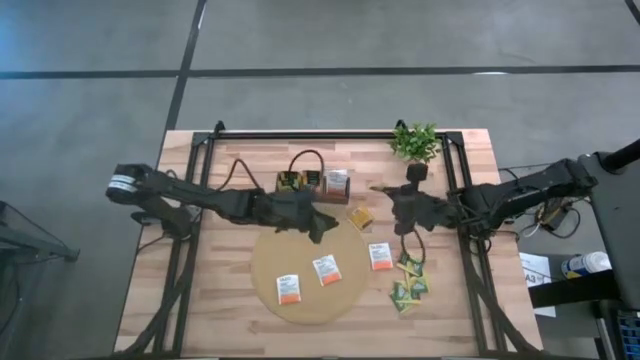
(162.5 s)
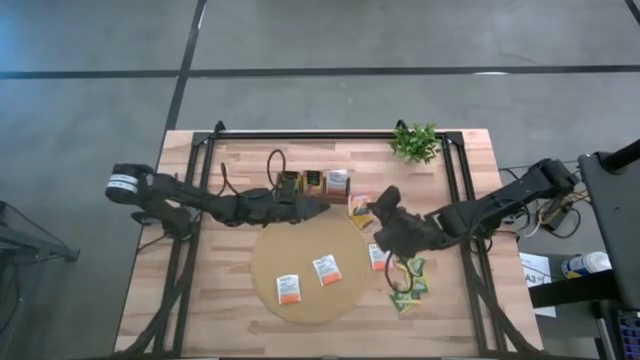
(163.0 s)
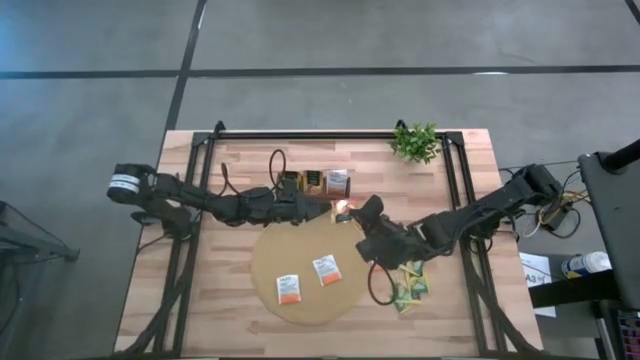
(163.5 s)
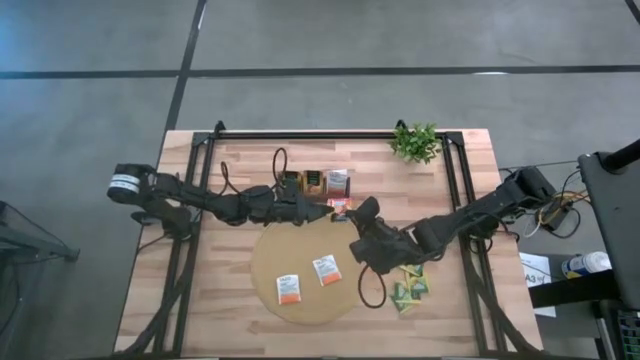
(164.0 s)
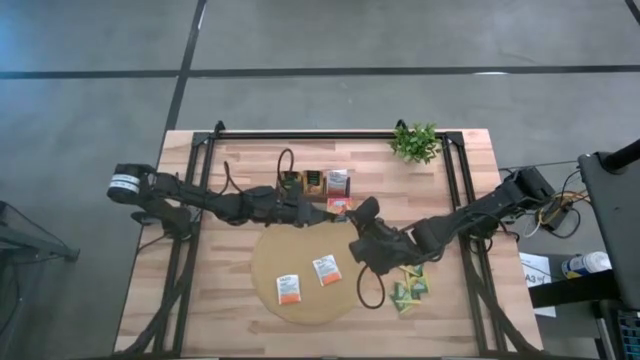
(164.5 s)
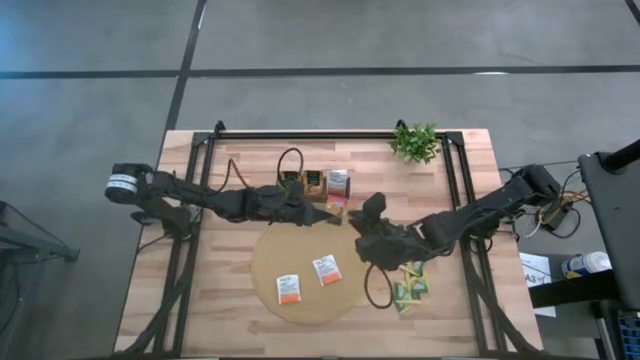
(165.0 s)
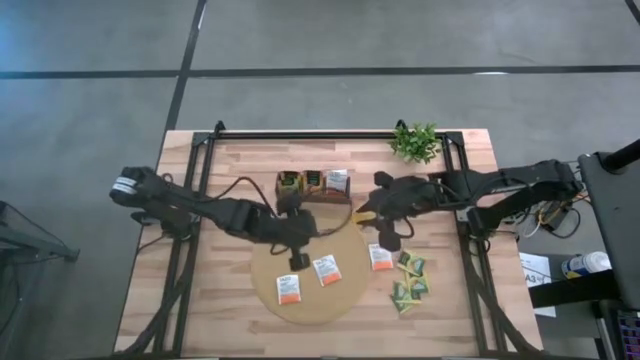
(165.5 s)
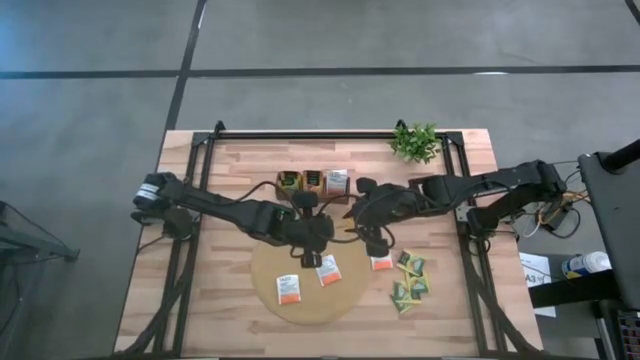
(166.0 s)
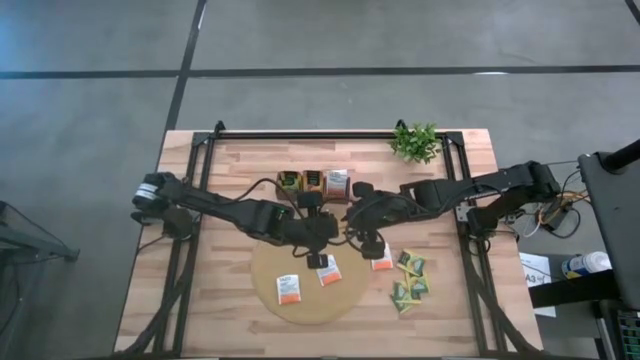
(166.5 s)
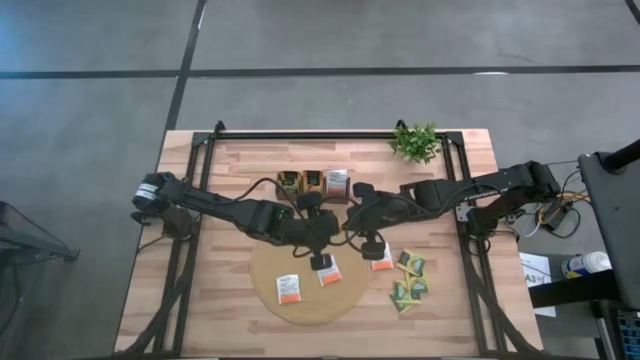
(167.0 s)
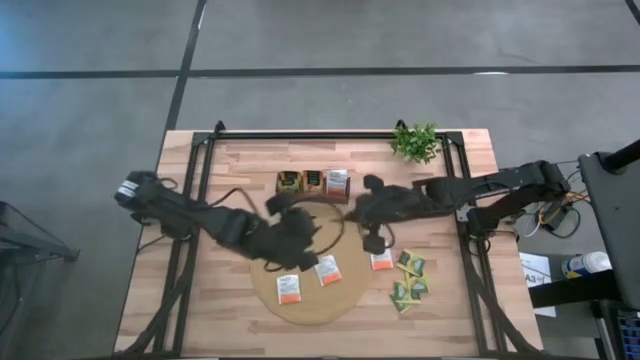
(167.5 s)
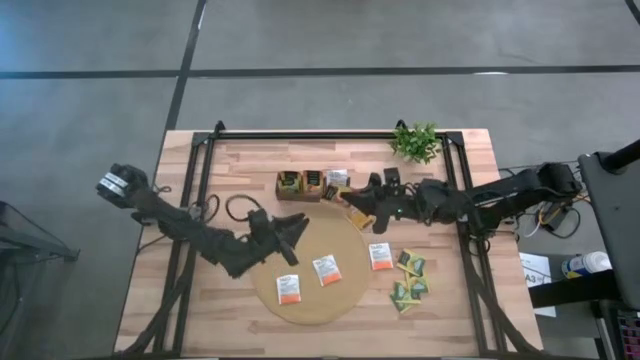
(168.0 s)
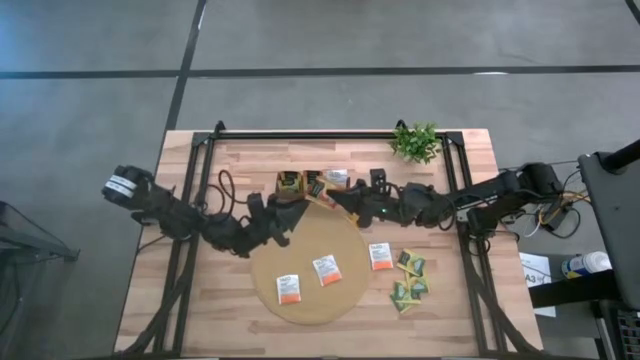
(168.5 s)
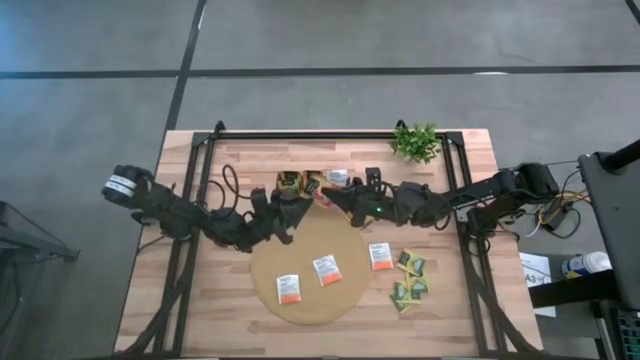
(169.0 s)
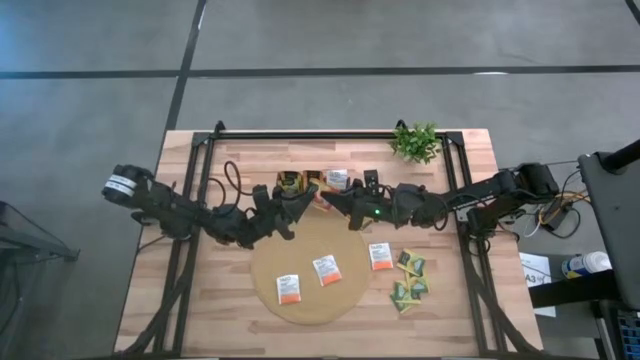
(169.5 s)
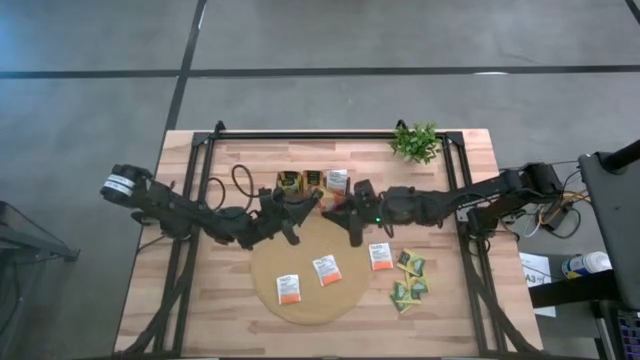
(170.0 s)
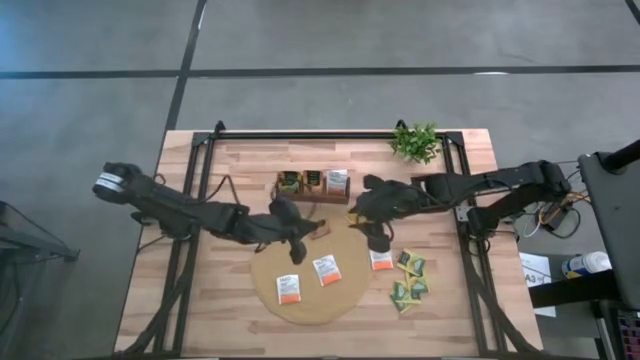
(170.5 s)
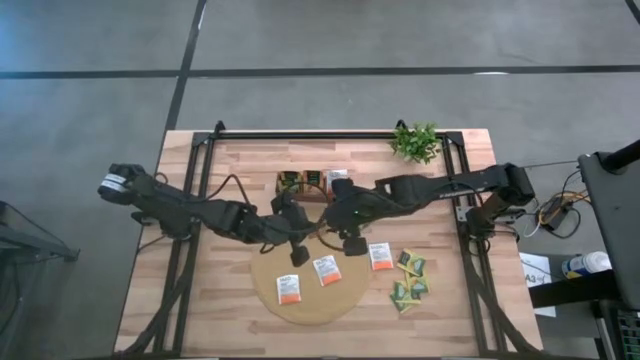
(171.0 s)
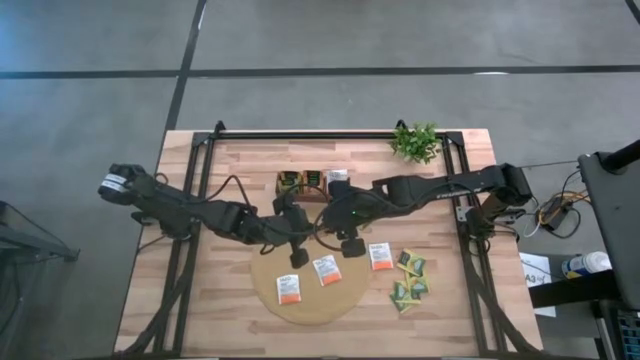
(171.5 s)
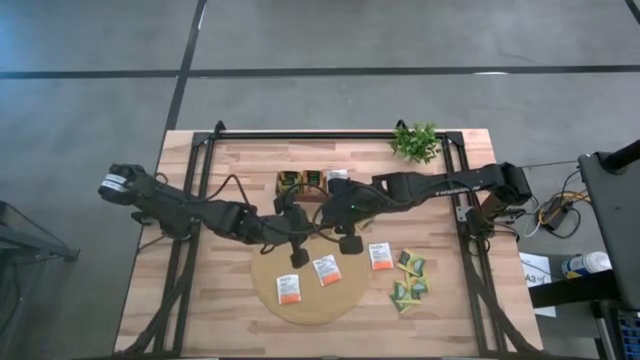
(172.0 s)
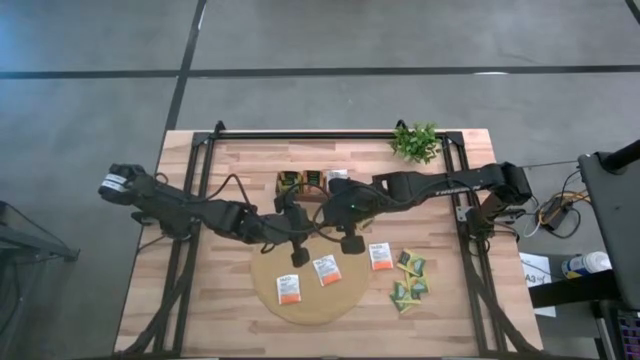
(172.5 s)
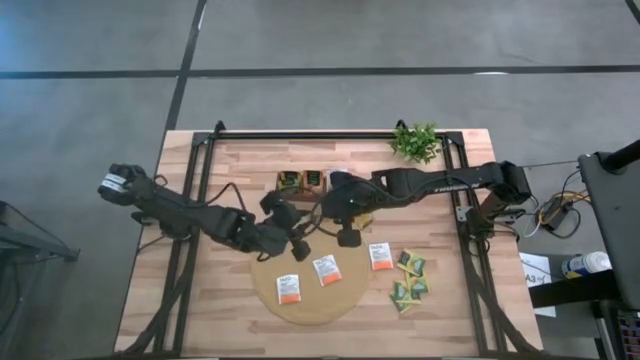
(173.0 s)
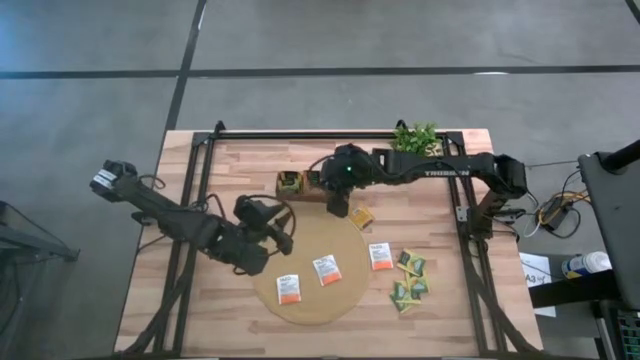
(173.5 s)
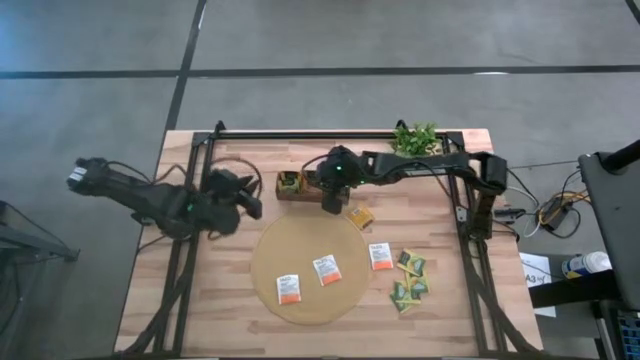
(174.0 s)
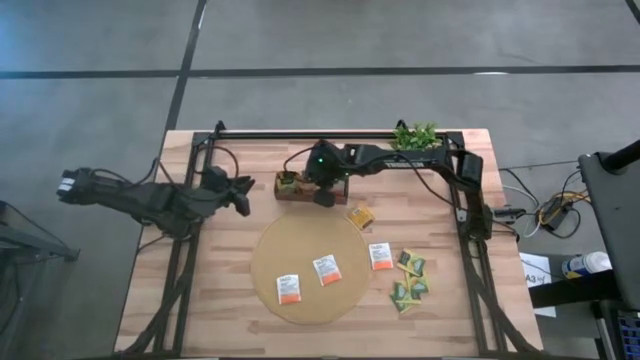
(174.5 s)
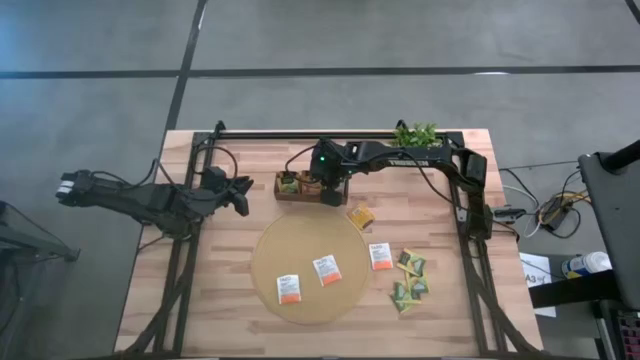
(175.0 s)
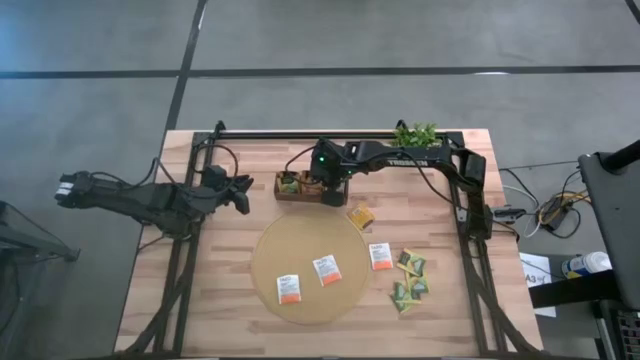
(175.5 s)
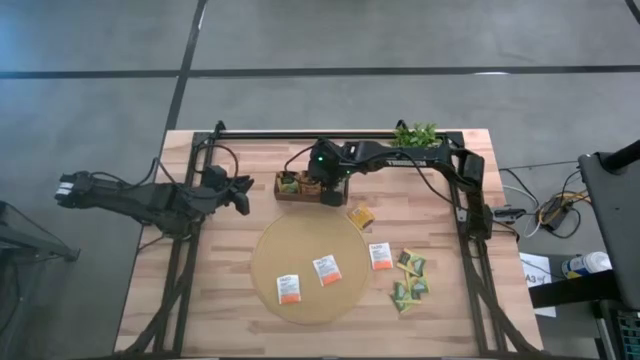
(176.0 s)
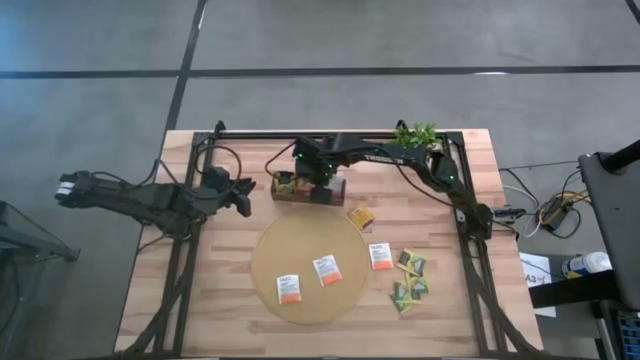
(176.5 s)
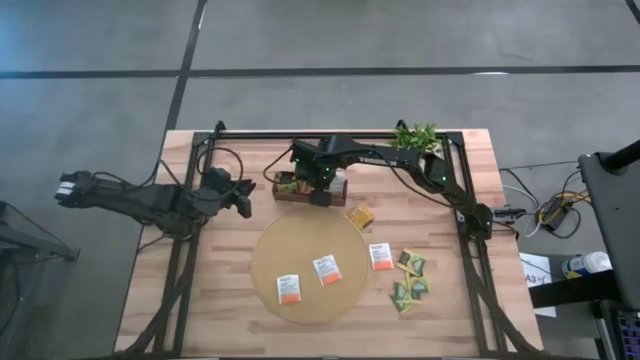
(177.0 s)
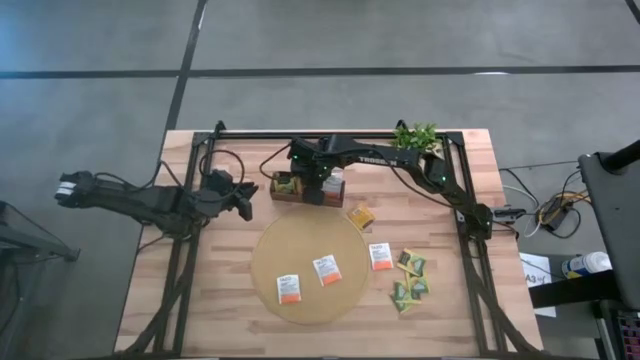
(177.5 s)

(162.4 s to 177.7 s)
Task: Pick & Place Tea
Put the yellow tea bag into the middle section of the wooden organizer

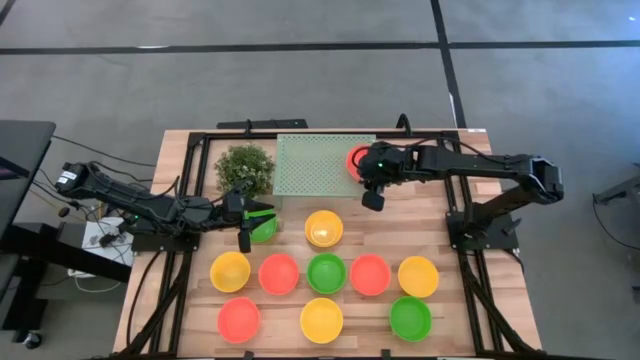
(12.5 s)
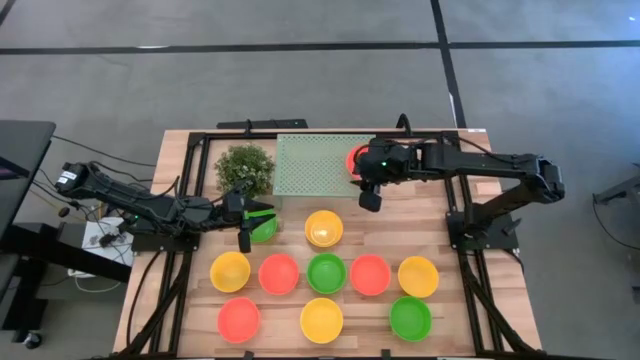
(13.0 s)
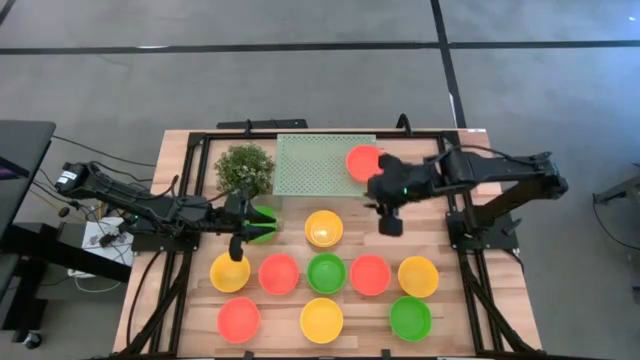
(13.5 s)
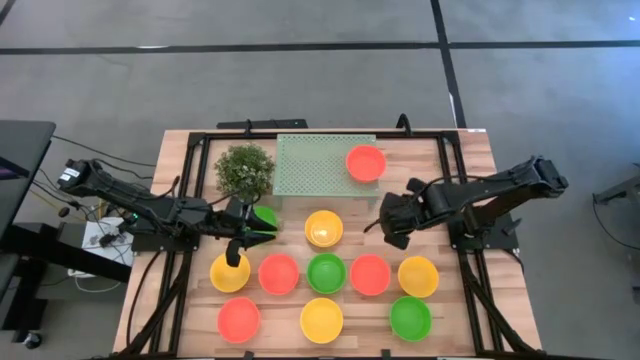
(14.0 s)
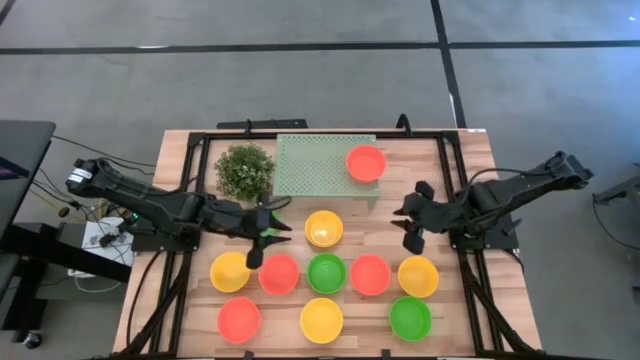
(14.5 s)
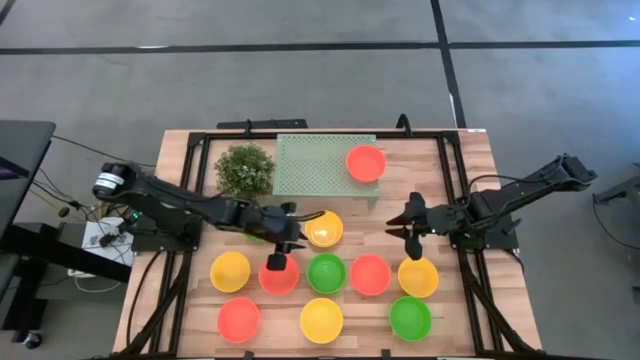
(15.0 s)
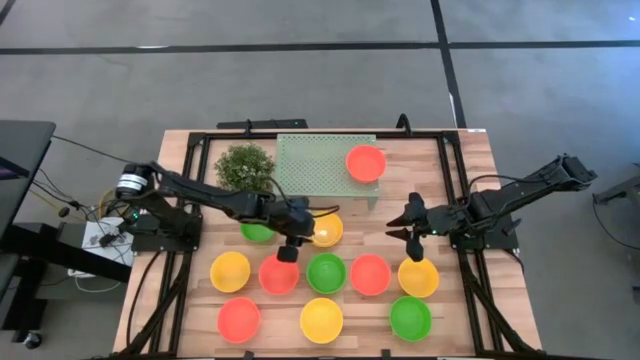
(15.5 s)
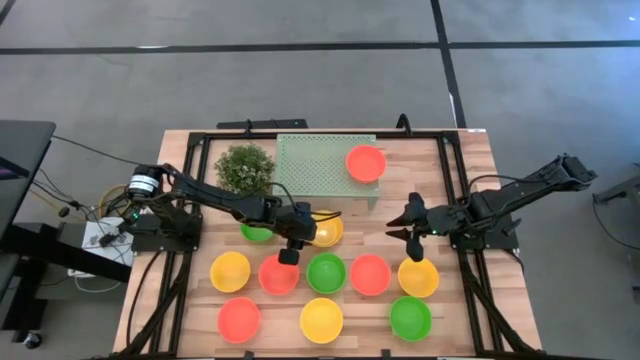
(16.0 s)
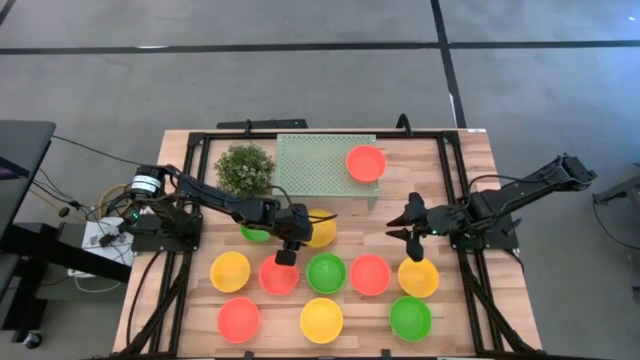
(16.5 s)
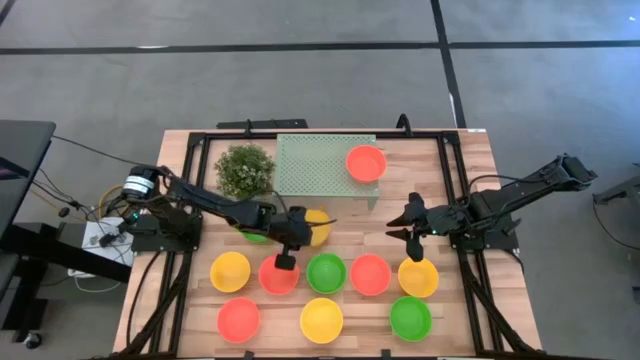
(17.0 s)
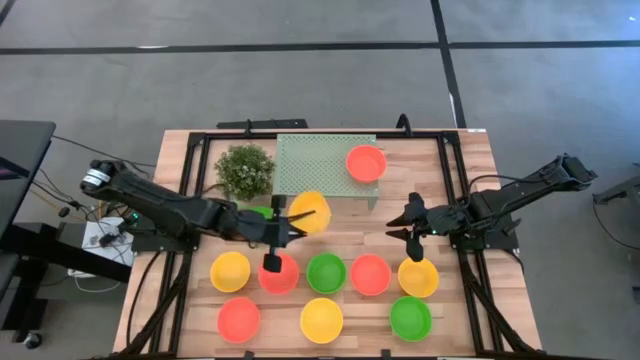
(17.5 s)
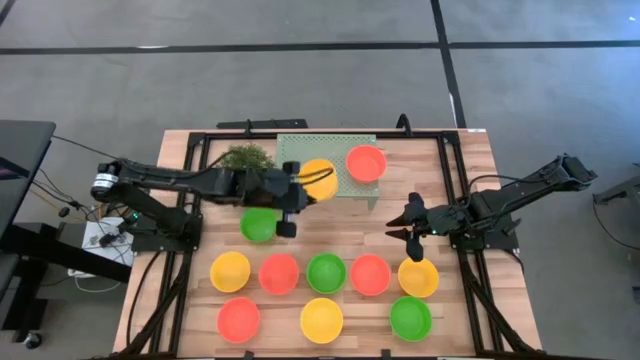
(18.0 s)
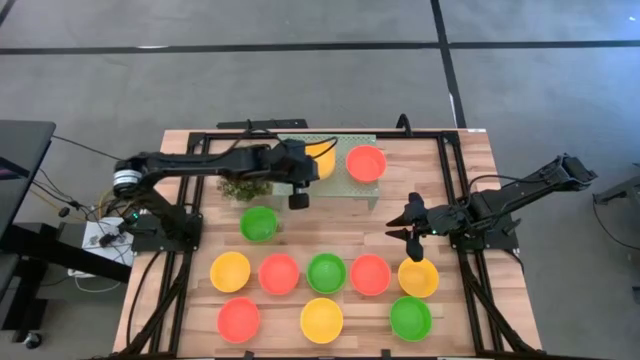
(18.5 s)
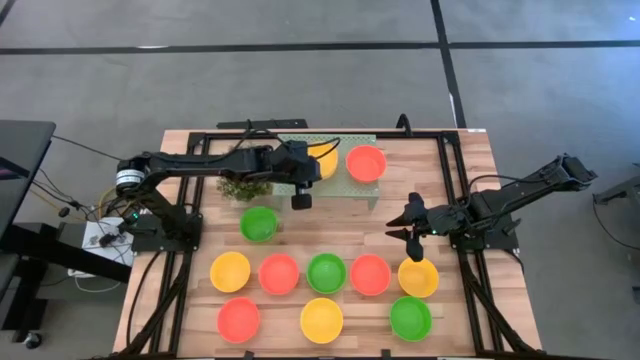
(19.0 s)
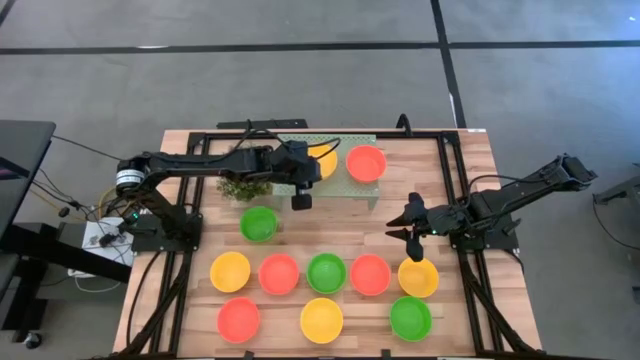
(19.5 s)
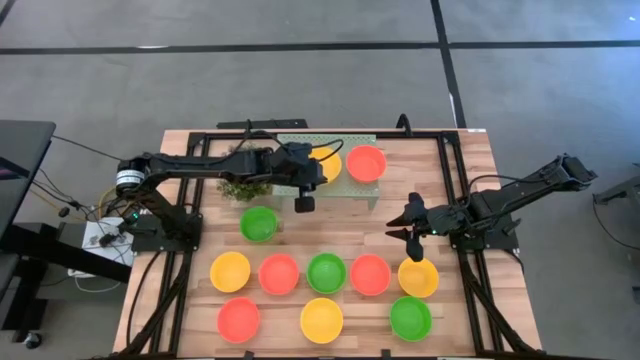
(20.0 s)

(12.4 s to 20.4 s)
Task: Pick & Place Mini bowls
Put the yellow bowl on the shelf
